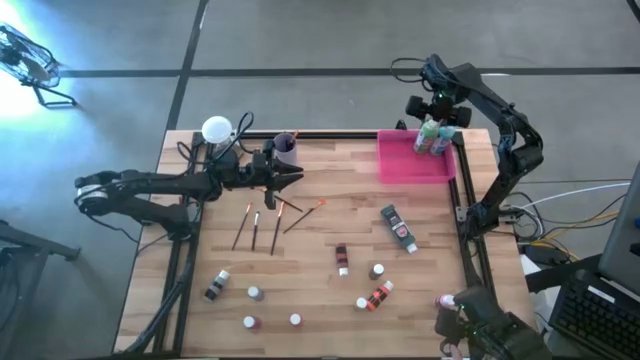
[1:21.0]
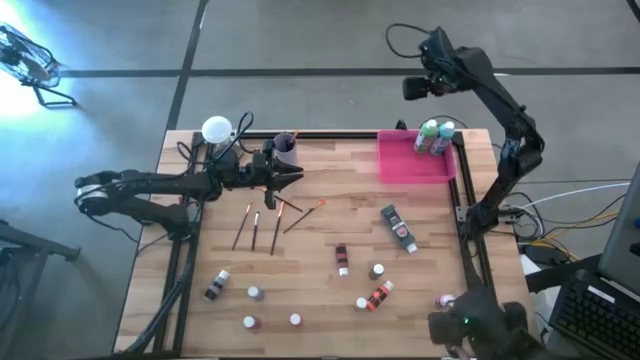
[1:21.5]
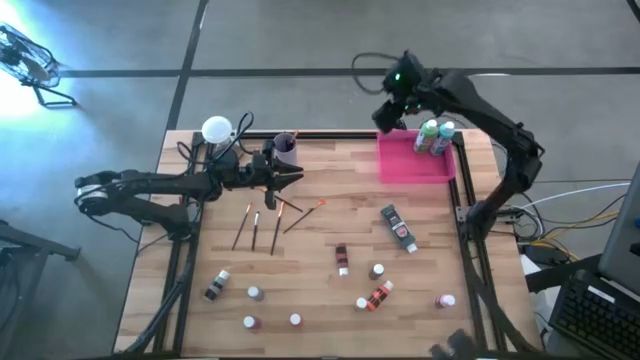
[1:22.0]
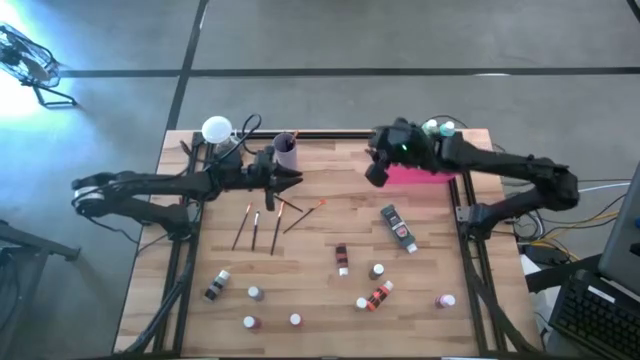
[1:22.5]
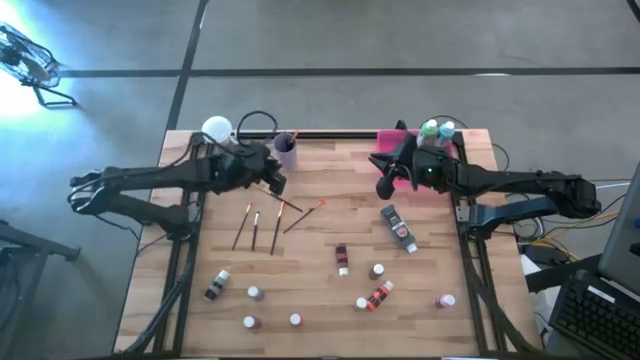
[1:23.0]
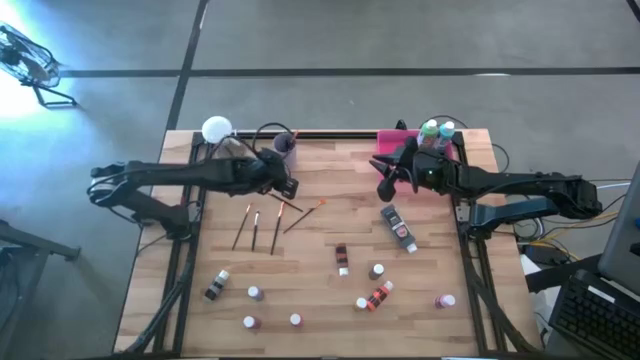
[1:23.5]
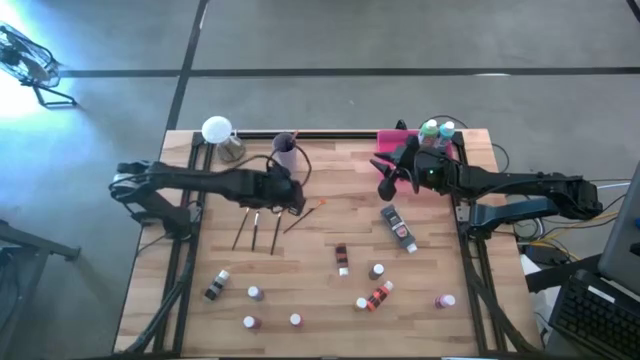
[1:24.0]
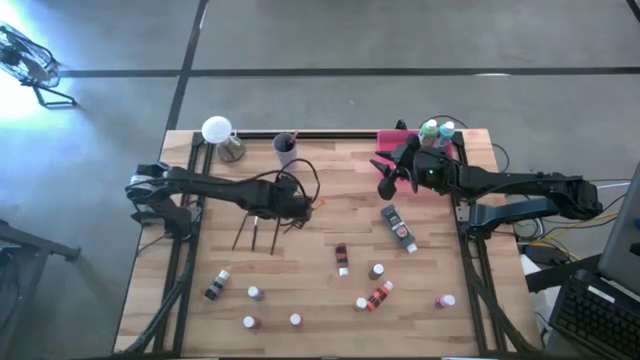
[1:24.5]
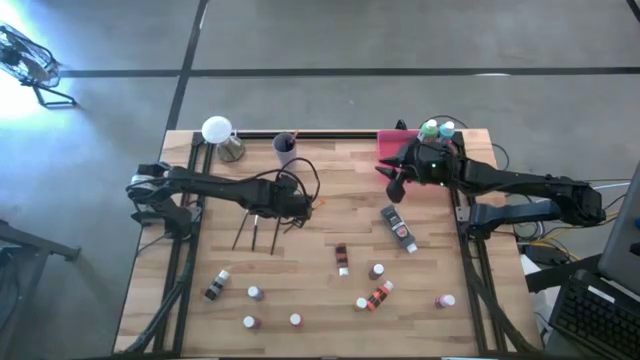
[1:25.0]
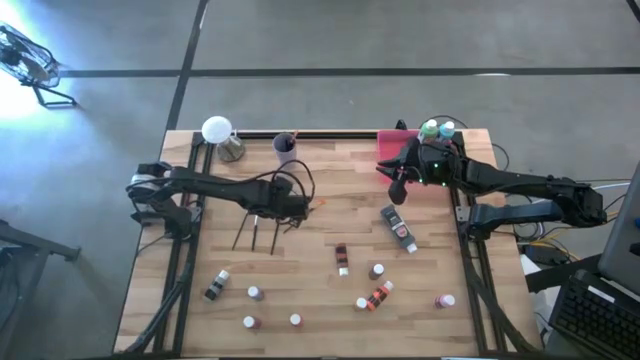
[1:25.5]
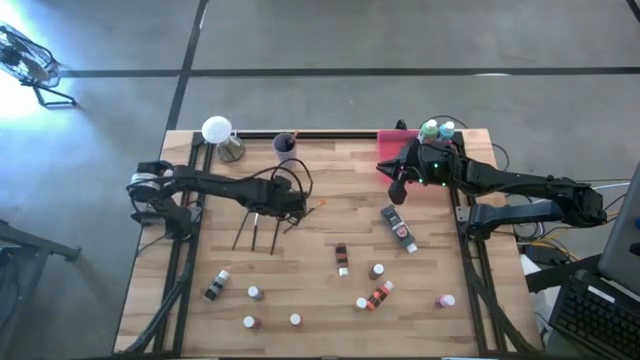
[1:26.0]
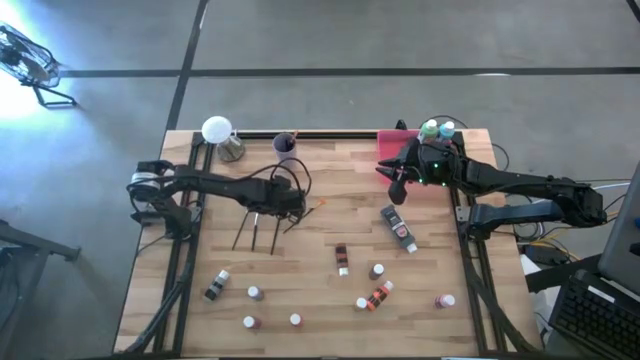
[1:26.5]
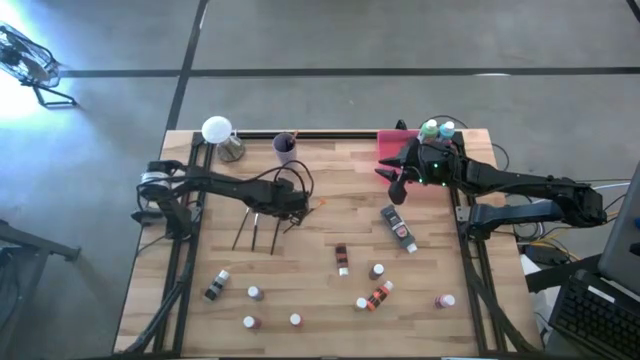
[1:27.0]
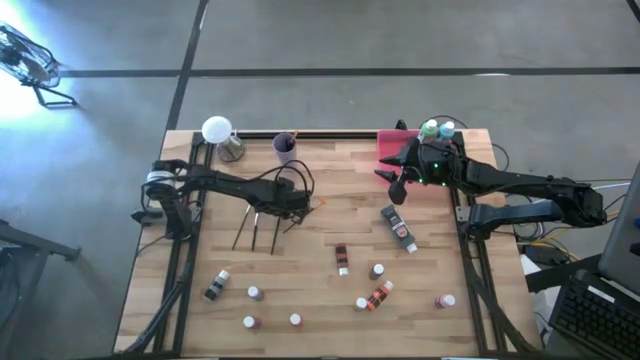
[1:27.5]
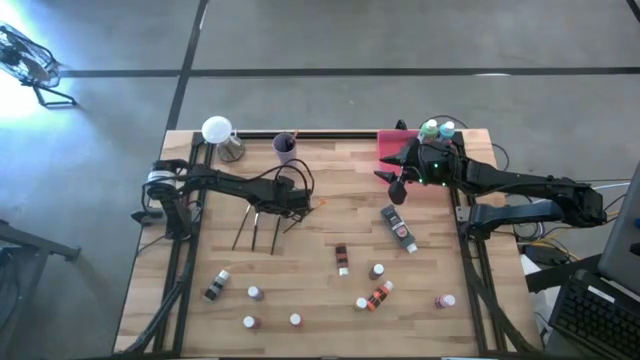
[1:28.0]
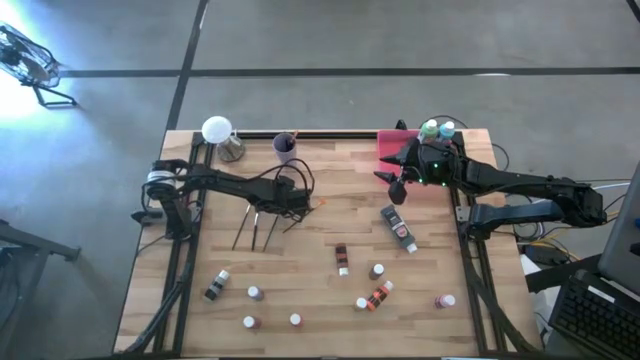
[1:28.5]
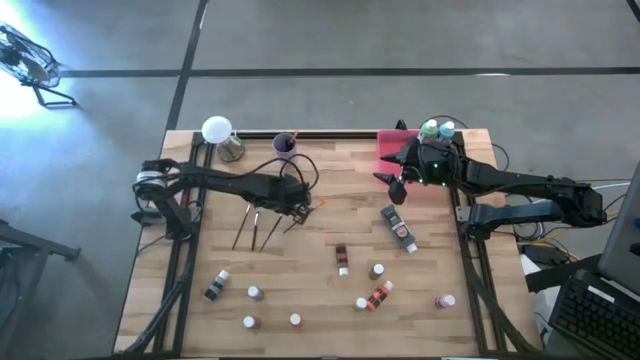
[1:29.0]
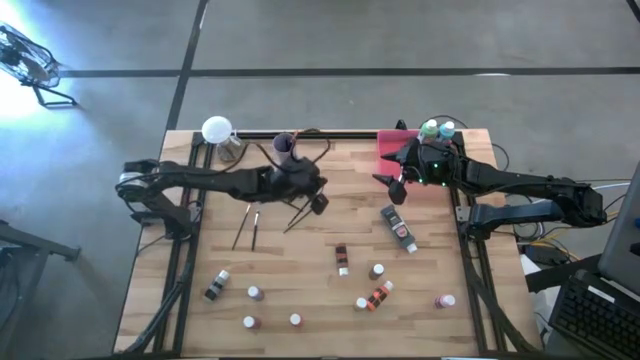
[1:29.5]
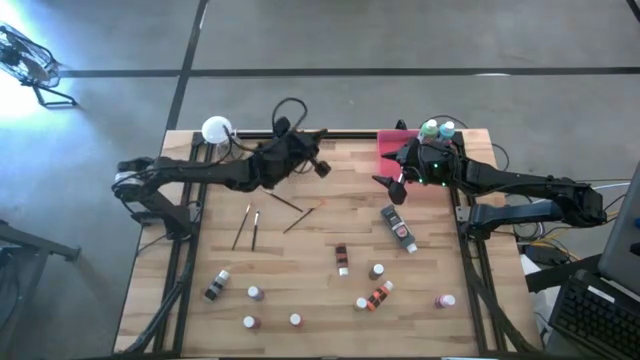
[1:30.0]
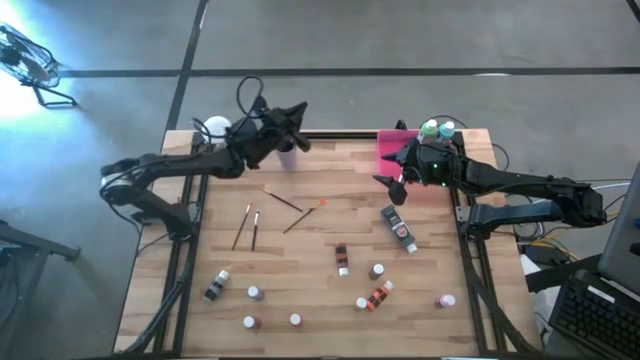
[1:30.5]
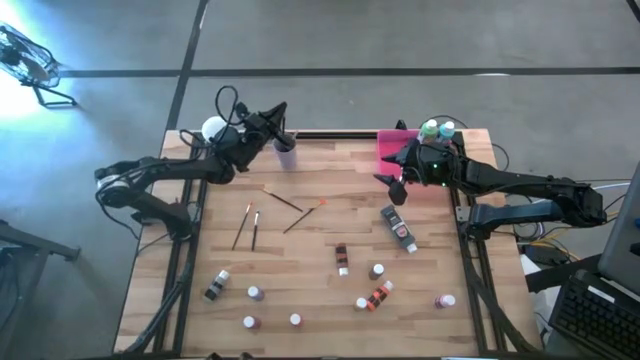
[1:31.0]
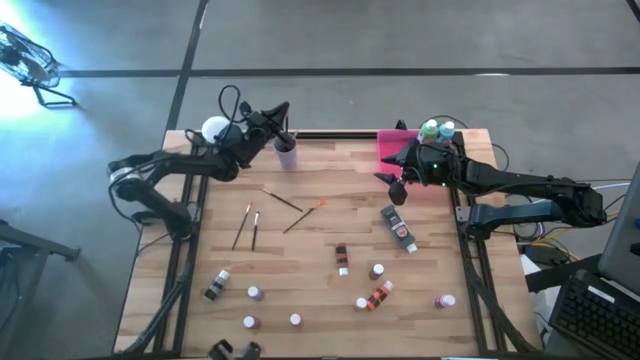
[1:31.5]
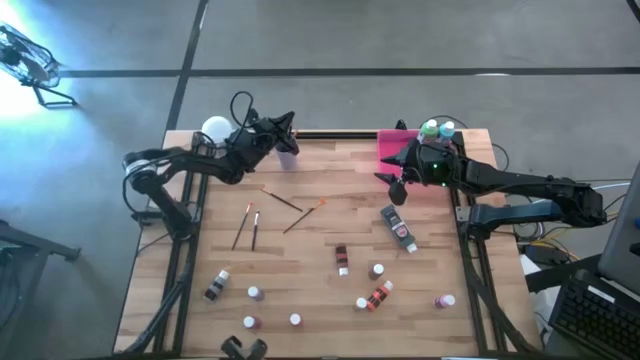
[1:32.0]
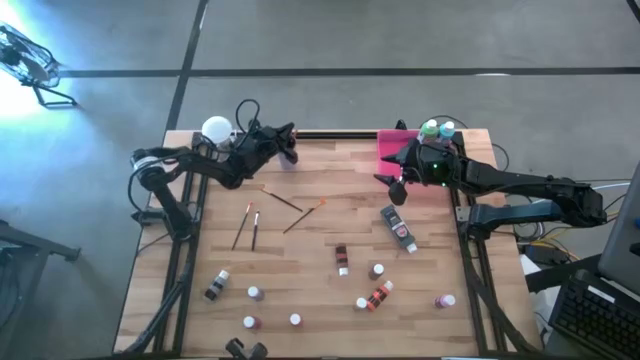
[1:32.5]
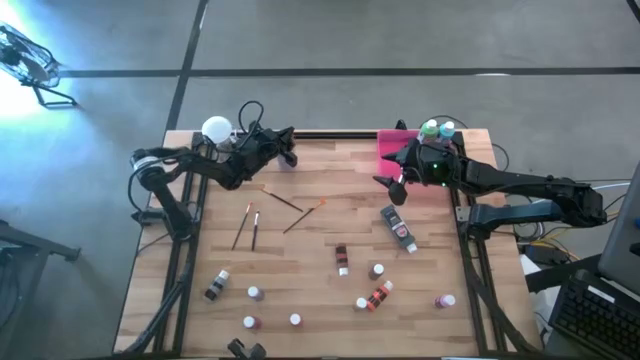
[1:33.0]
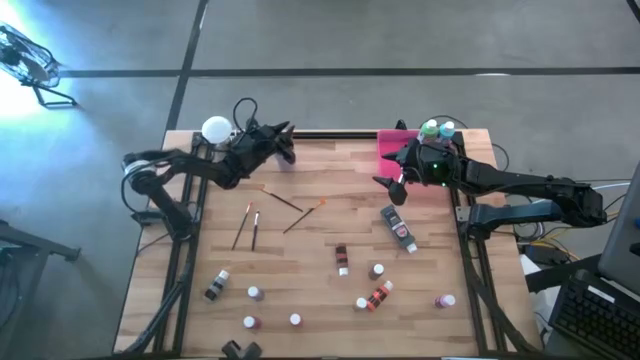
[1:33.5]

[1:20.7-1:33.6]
Task: Pick & Place Paint Supplies
Put the gold black paint brush into the purple cup

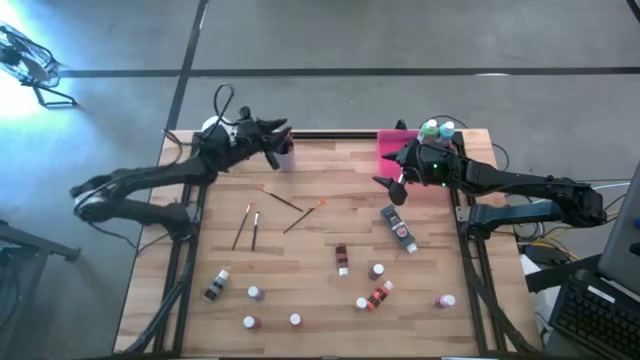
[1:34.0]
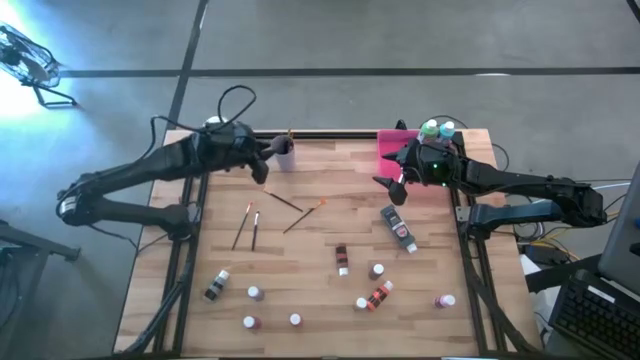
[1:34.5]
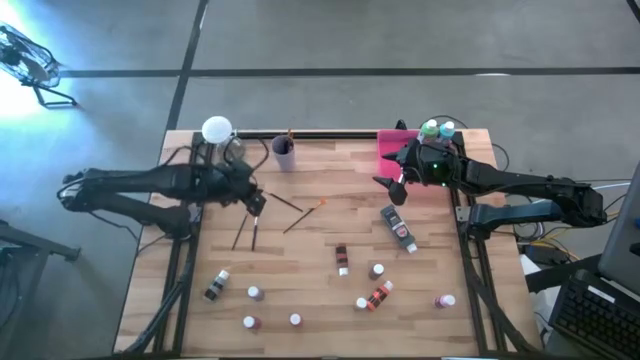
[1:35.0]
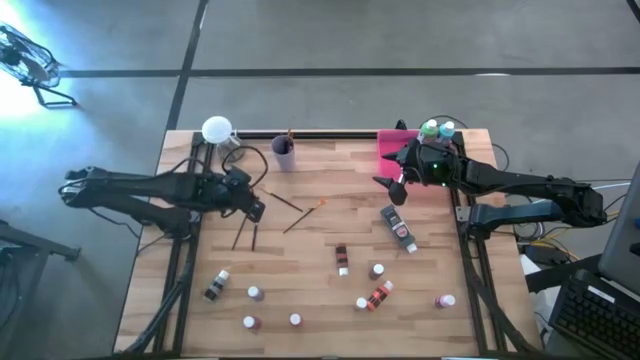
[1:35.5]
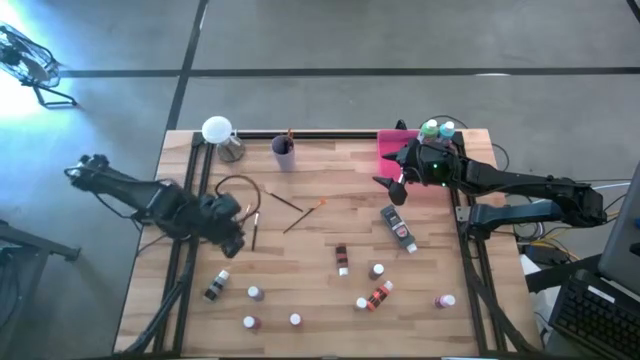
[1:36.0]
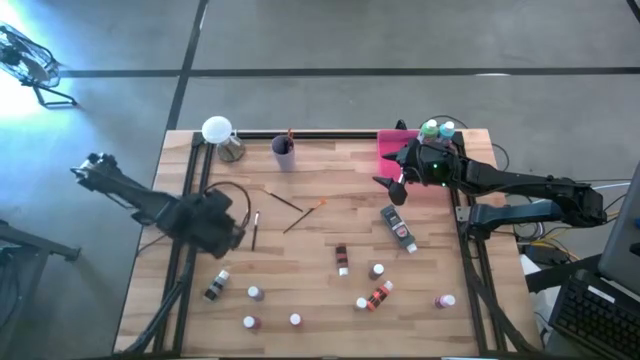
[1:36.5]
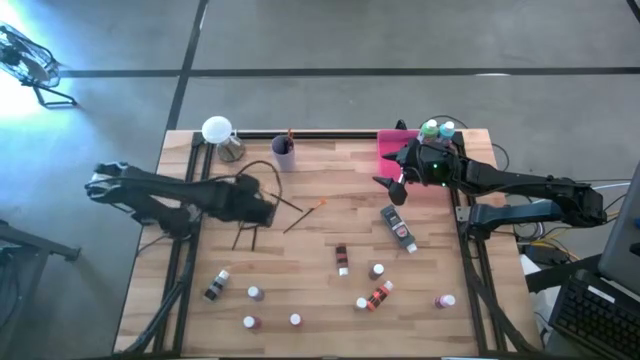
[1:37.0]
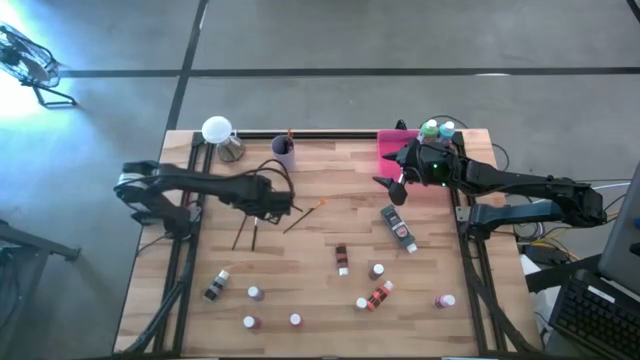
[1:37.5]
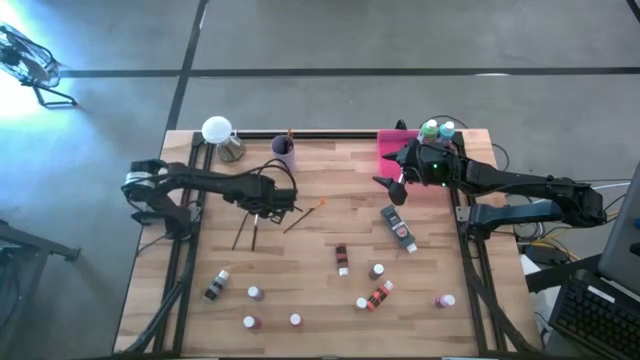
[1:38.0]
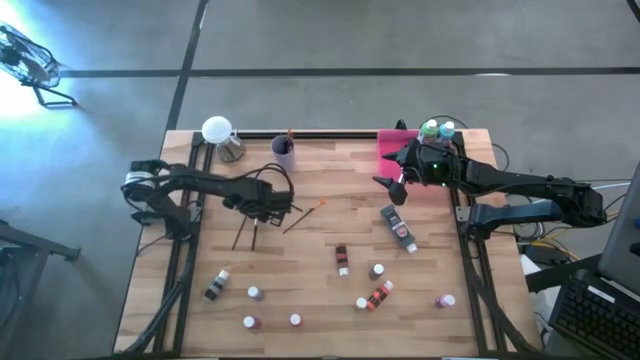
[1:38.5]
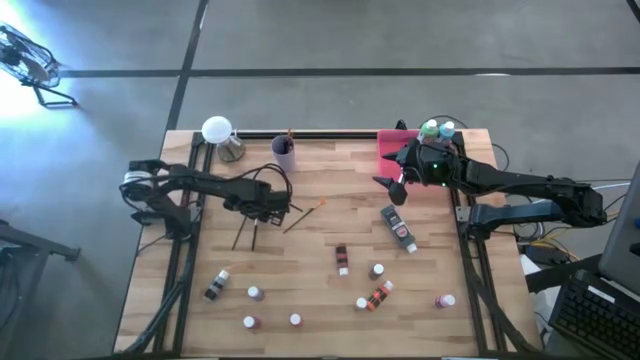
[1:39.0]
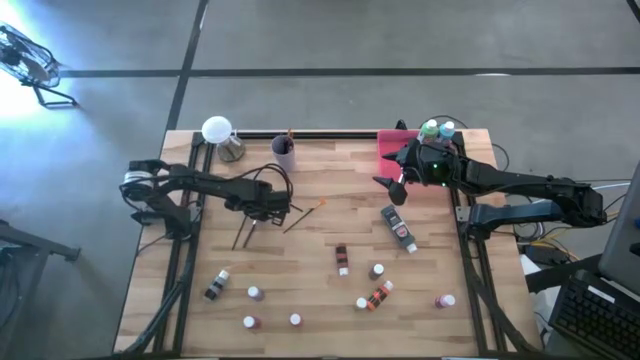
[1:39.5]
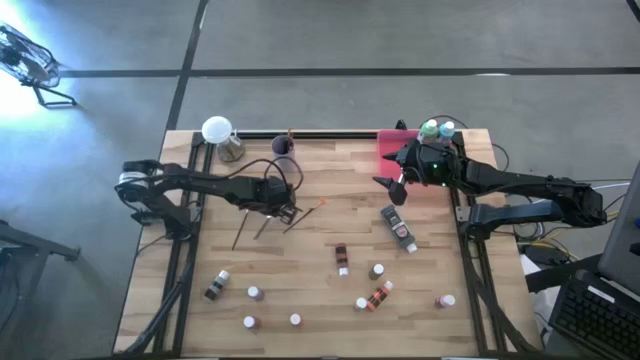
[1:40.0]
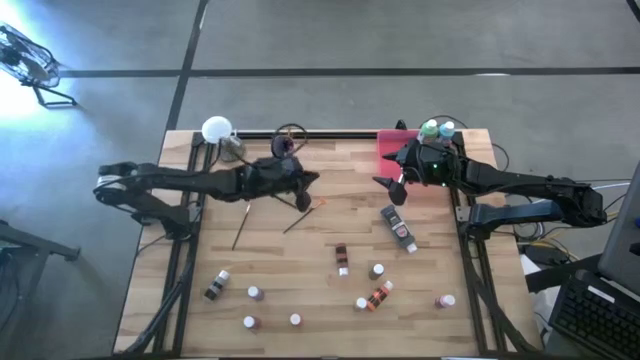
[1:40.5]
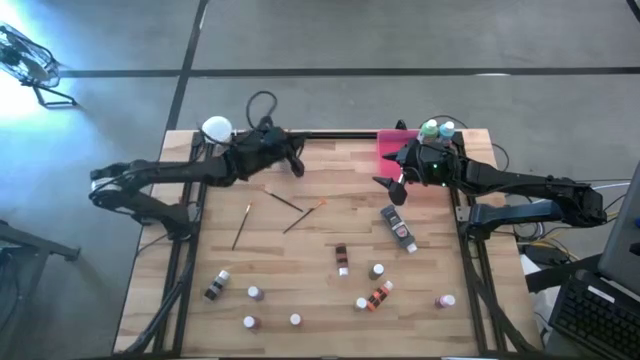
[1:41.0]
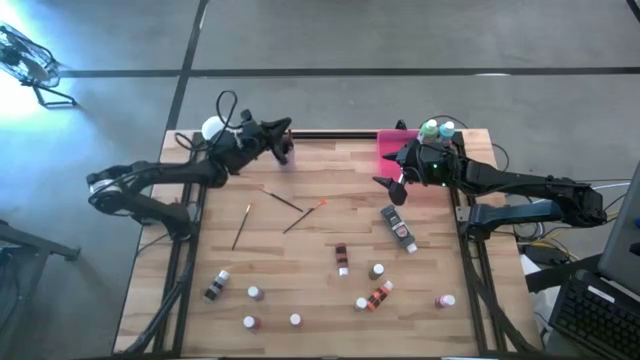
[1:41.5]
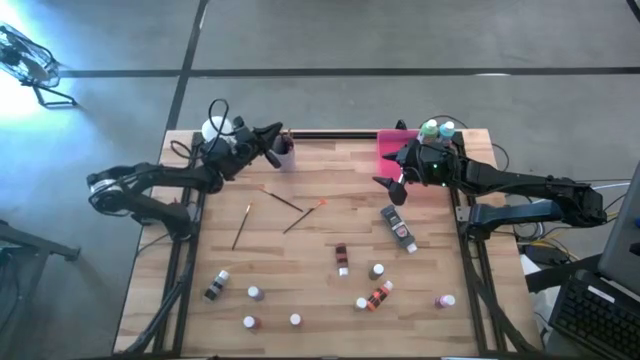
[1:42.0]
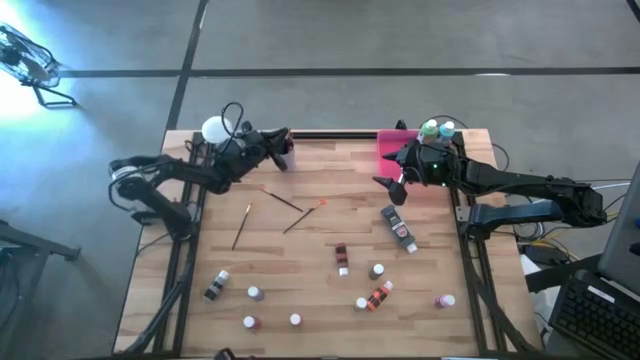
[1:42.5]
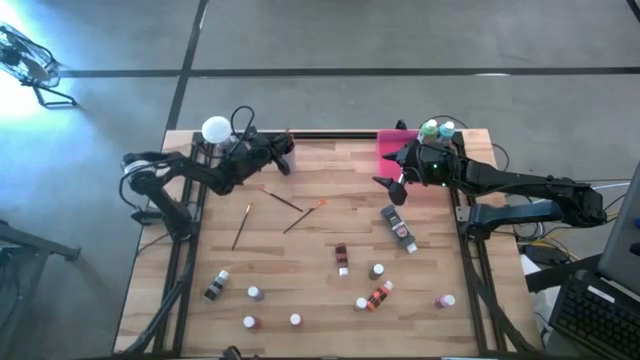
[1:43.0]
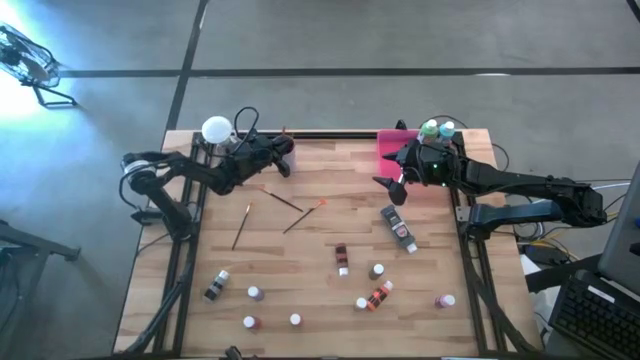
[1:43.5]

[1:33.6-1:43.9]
Put the silver black paint brush into the purple cup
